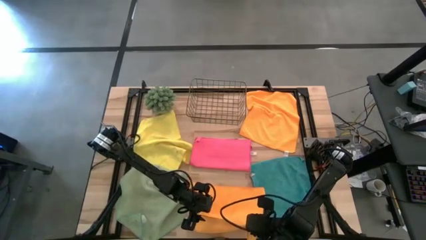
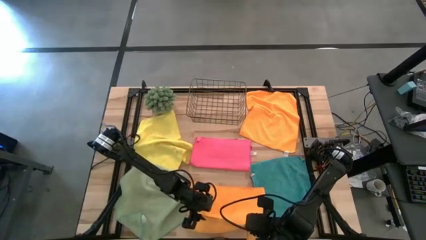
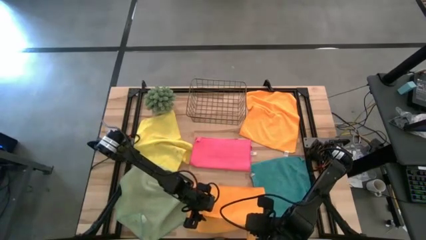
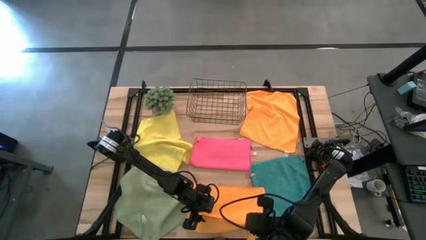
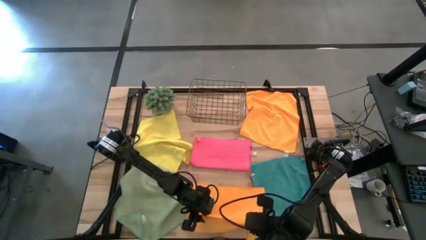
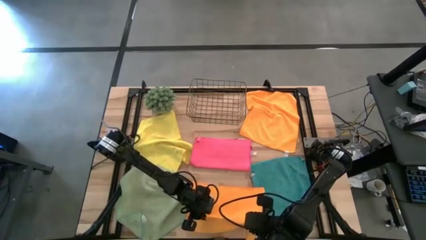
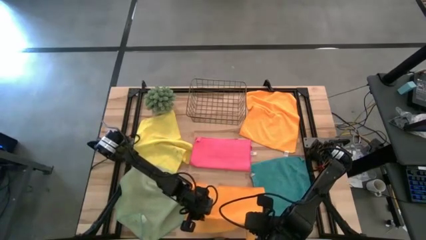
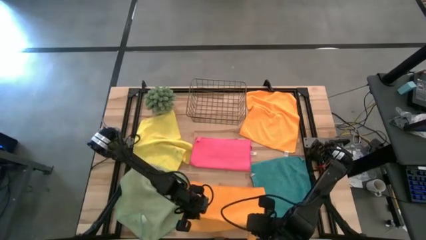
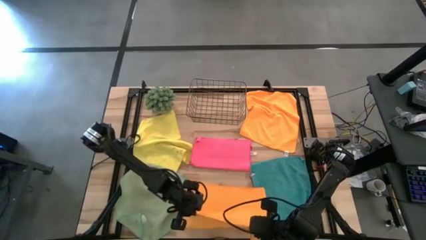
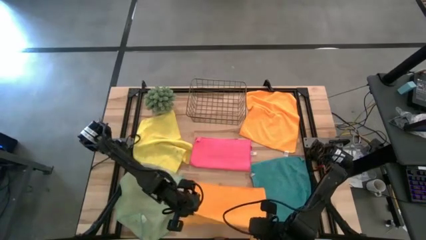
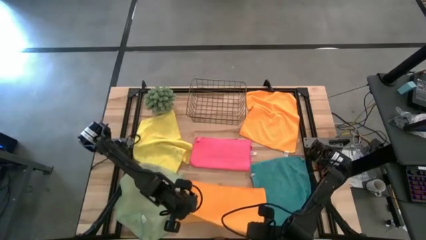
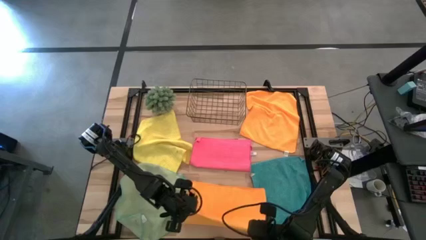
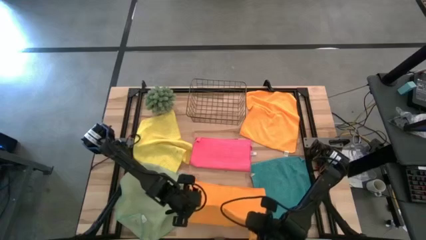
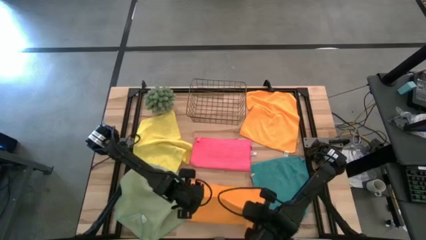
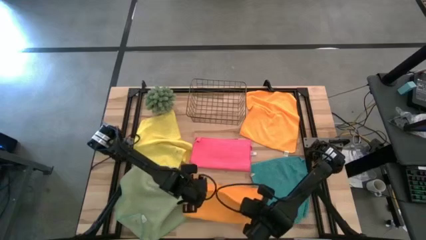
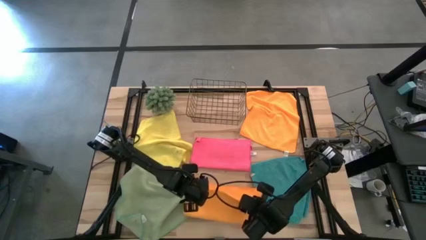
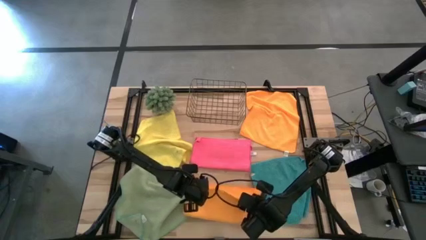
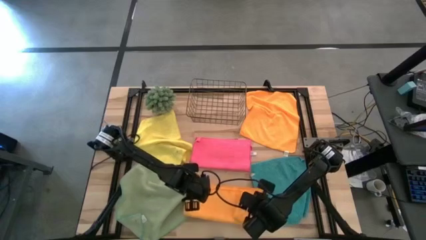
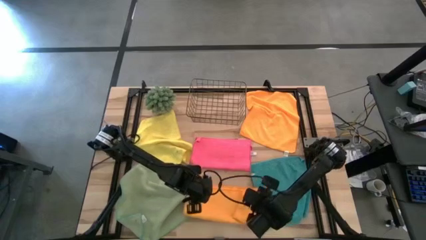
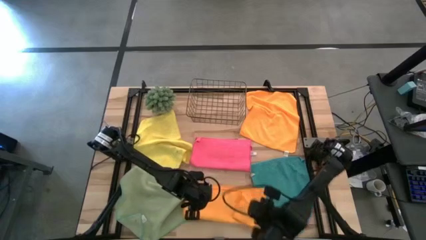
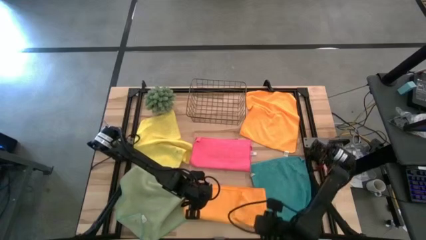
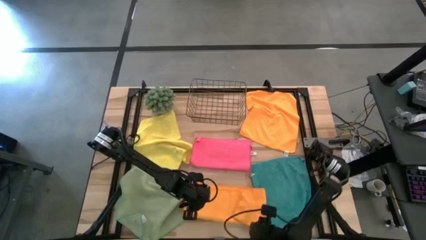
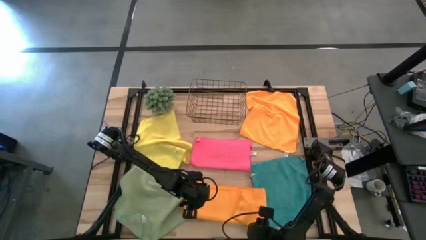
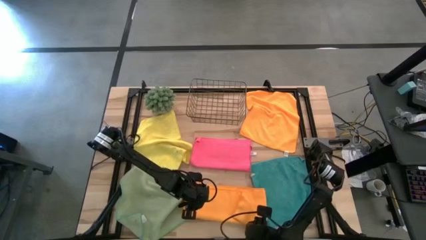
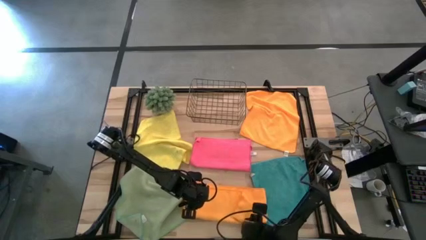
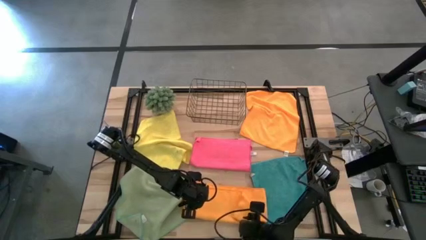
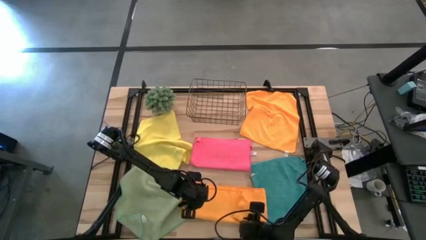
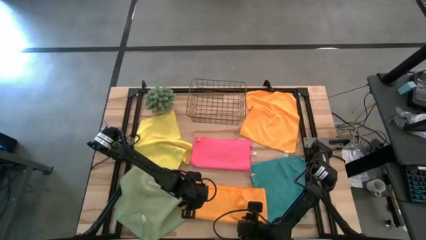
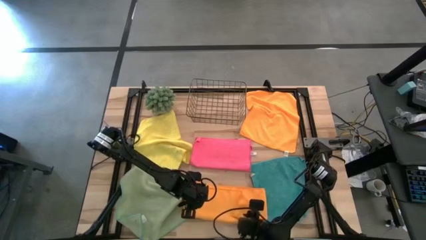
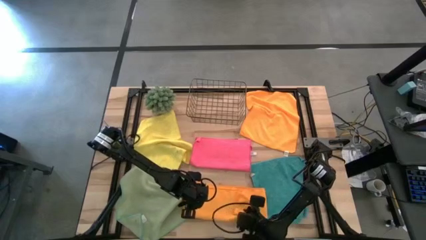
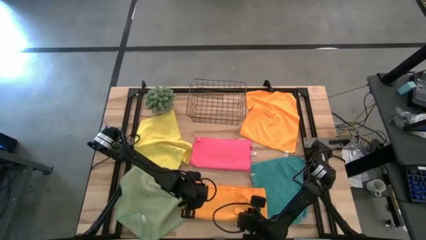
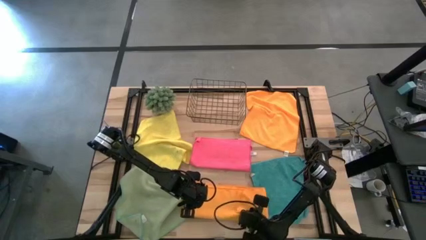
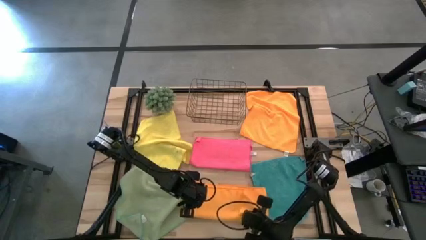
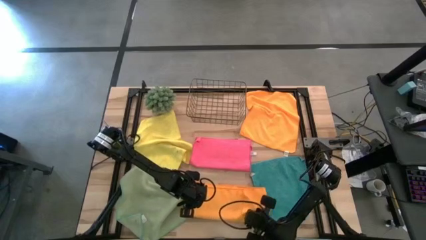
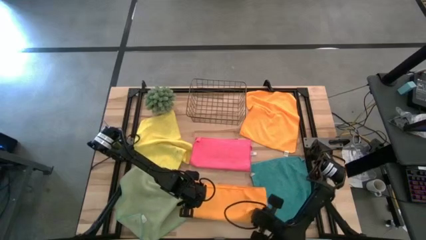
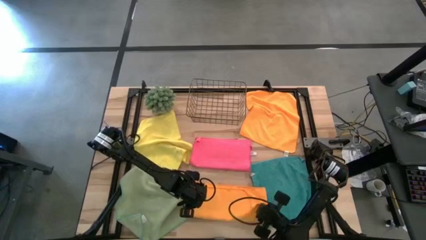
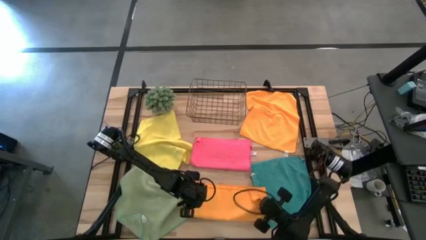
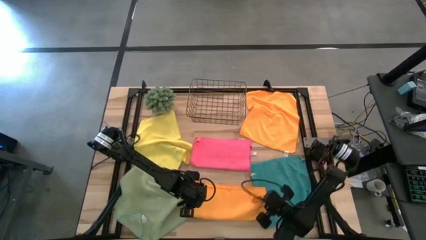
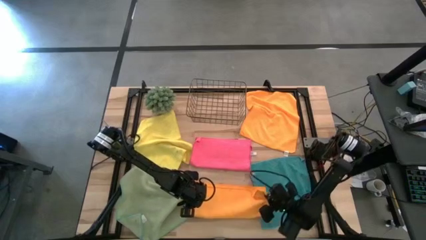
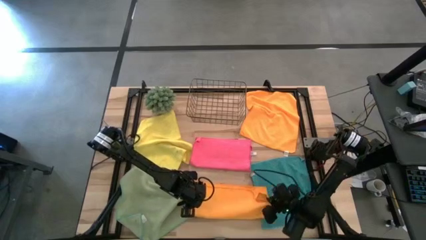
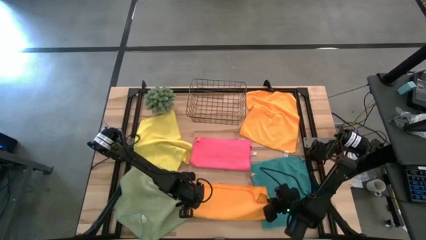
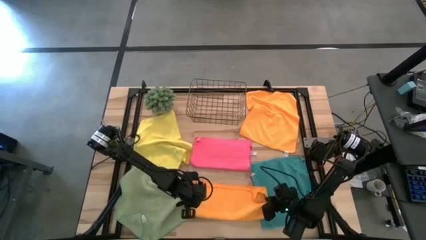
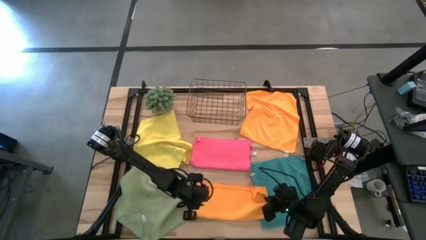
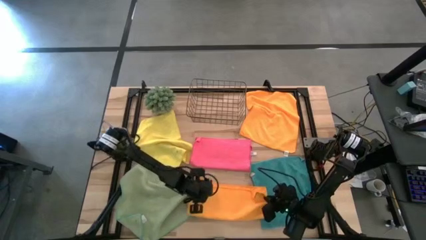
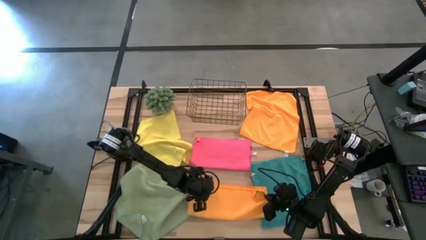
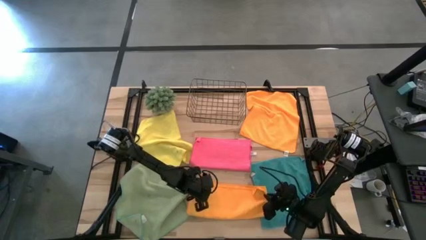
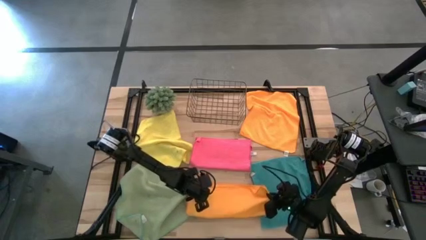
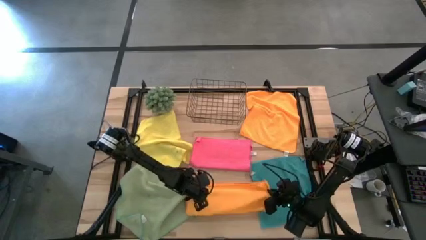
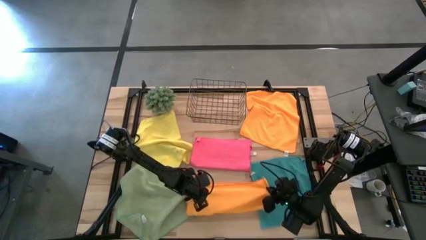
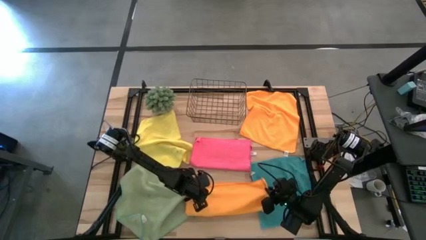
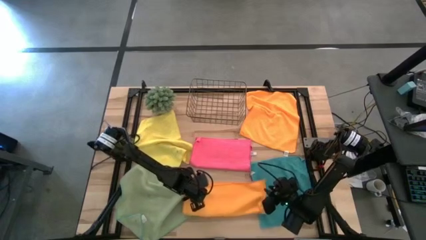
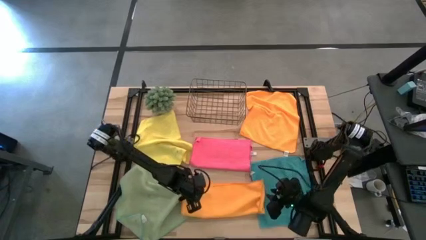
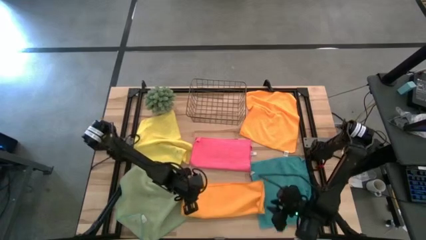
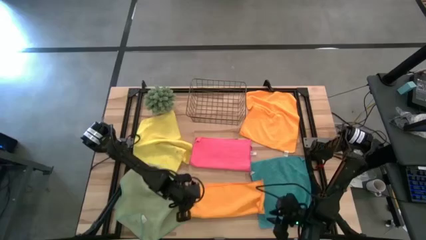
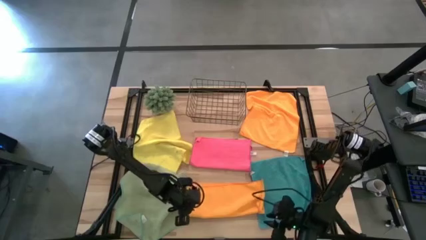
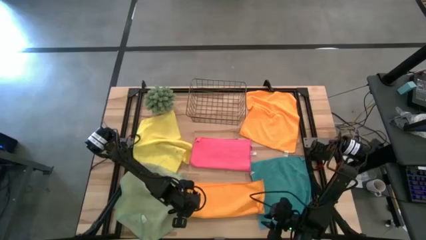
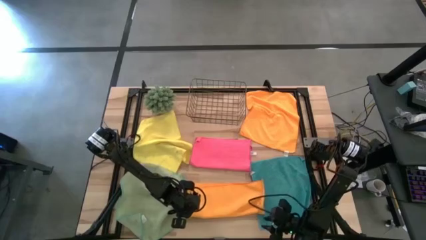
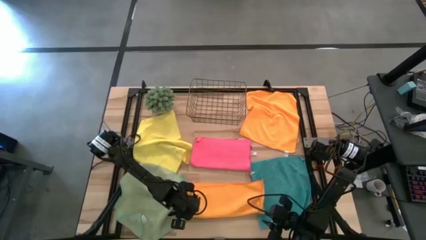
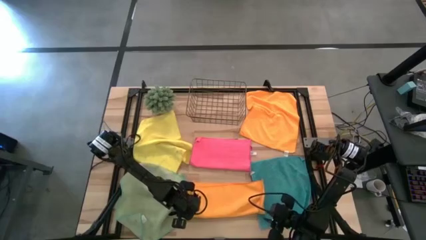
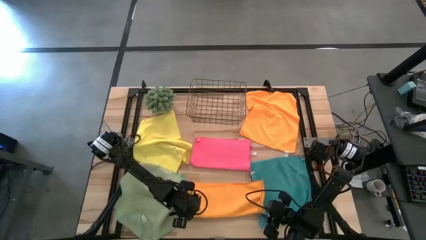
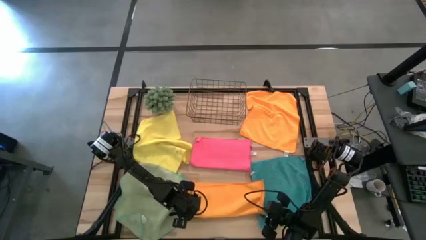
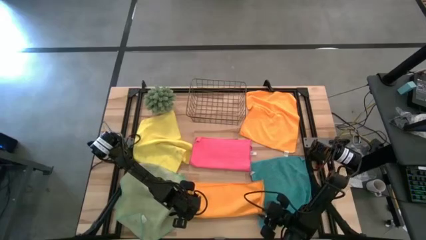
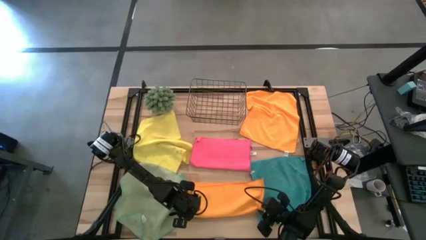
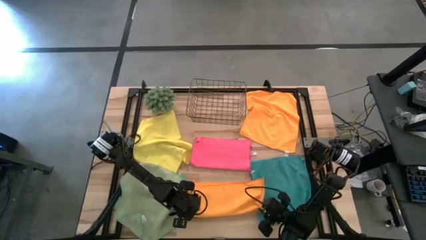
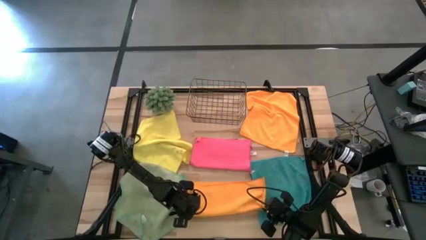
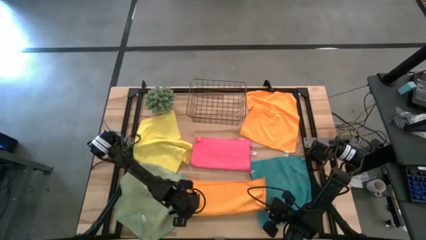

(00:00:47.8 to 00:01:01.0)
Task: Fold microfiber towels
Fold the bottom orange microfiber towel
